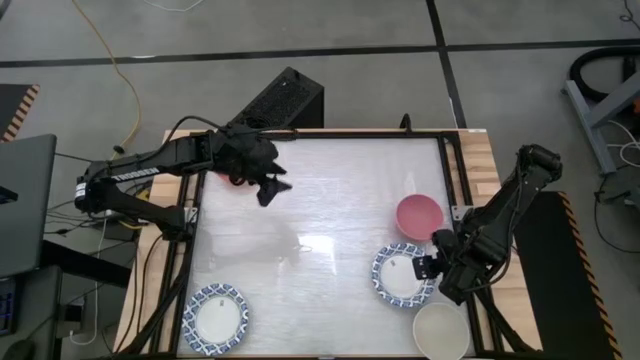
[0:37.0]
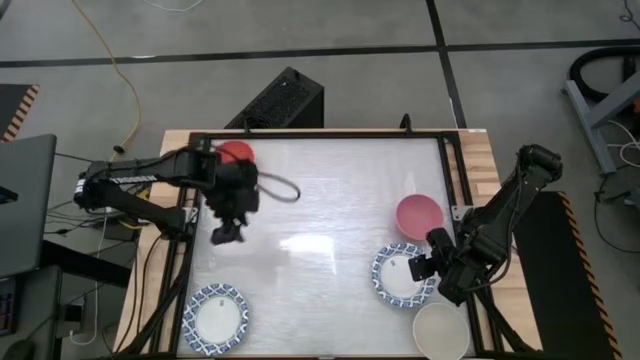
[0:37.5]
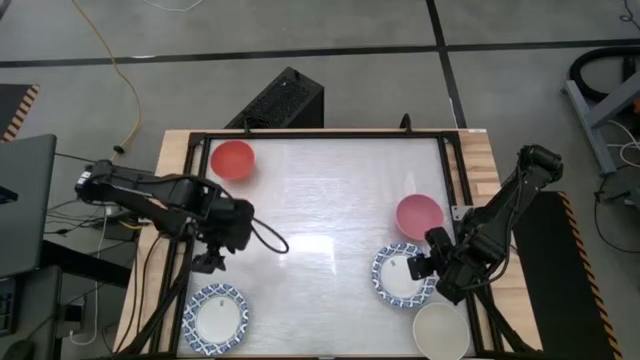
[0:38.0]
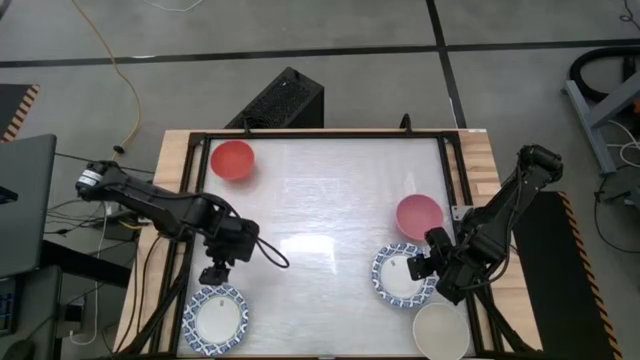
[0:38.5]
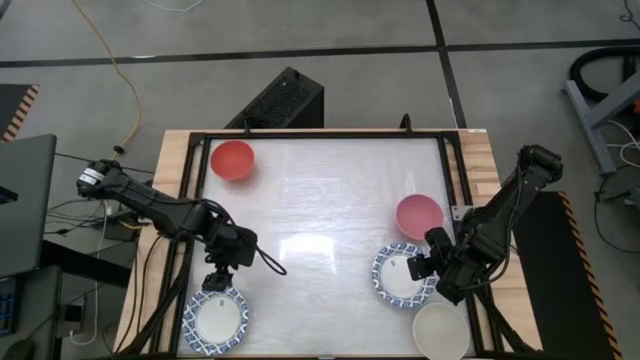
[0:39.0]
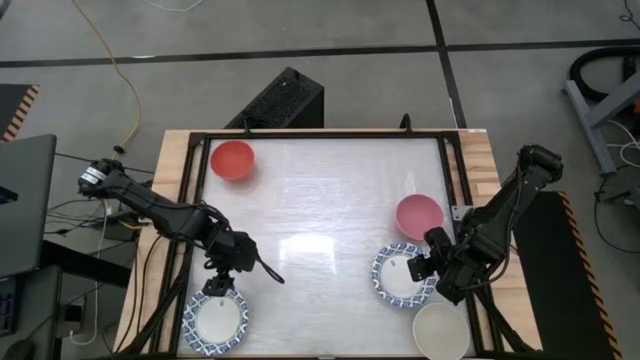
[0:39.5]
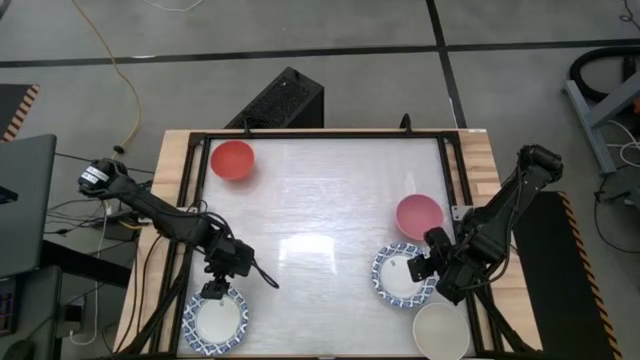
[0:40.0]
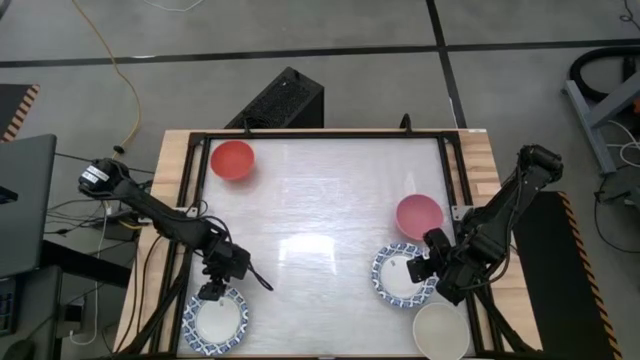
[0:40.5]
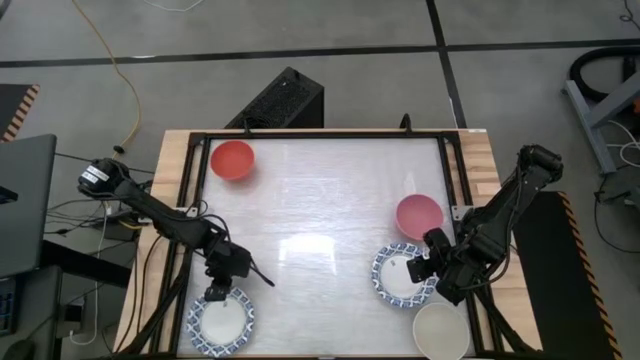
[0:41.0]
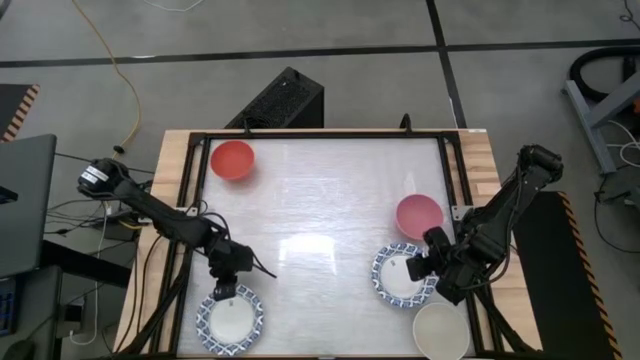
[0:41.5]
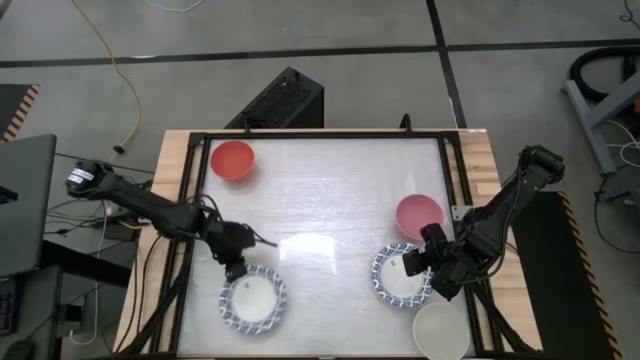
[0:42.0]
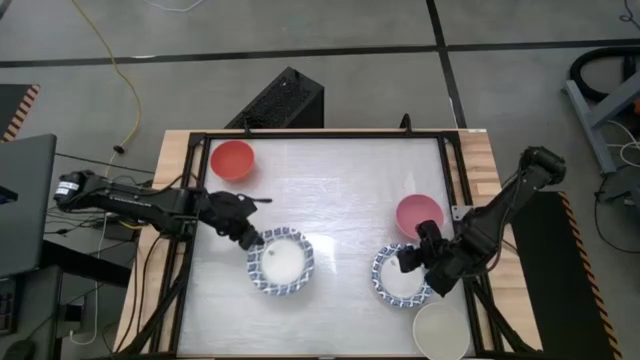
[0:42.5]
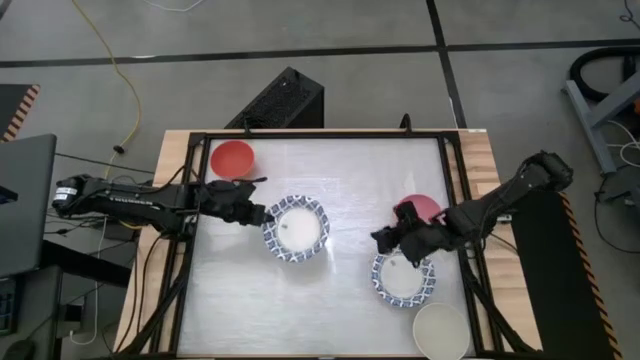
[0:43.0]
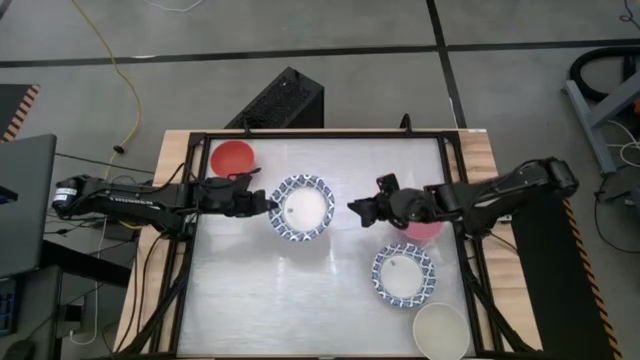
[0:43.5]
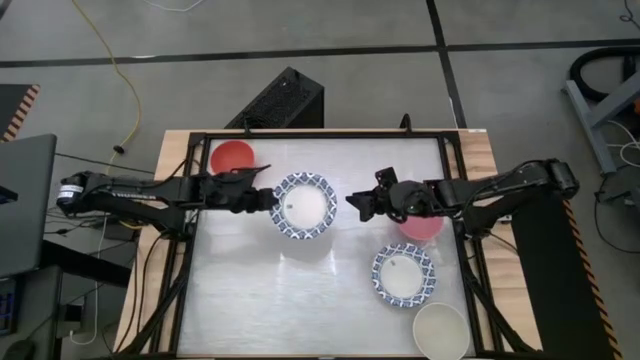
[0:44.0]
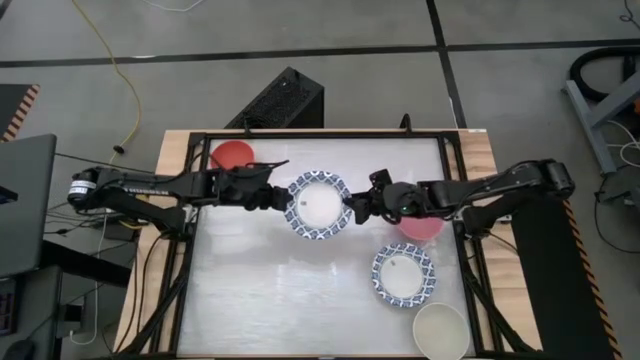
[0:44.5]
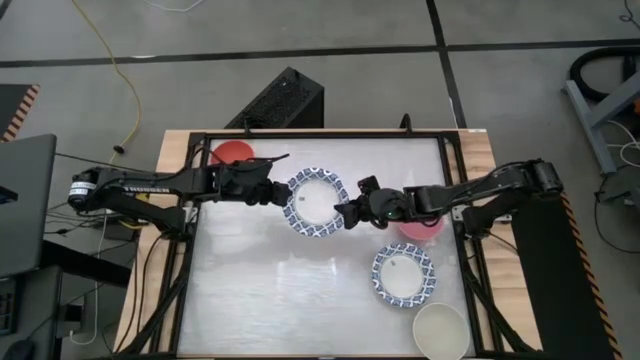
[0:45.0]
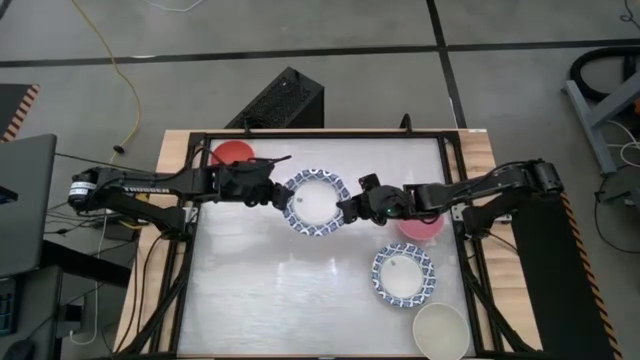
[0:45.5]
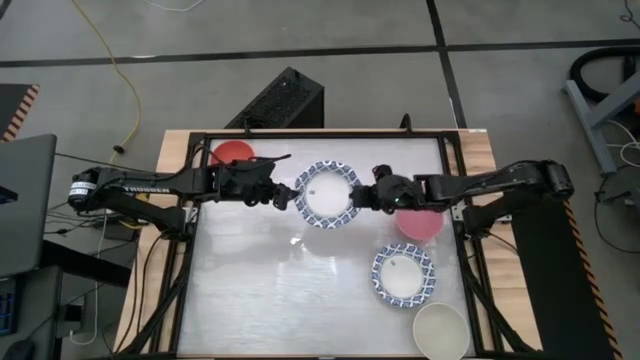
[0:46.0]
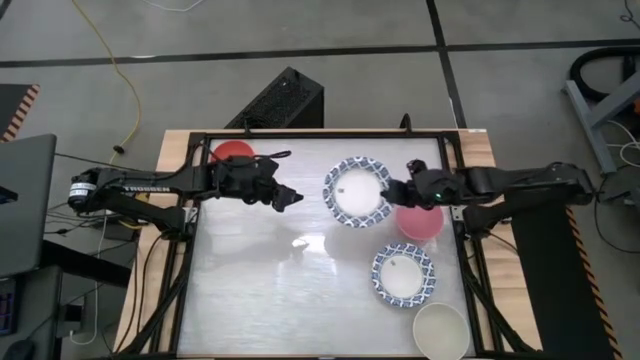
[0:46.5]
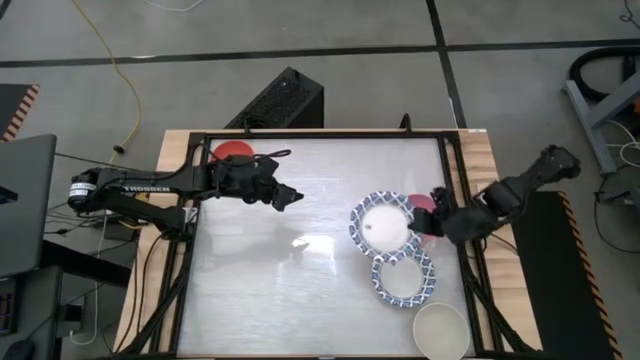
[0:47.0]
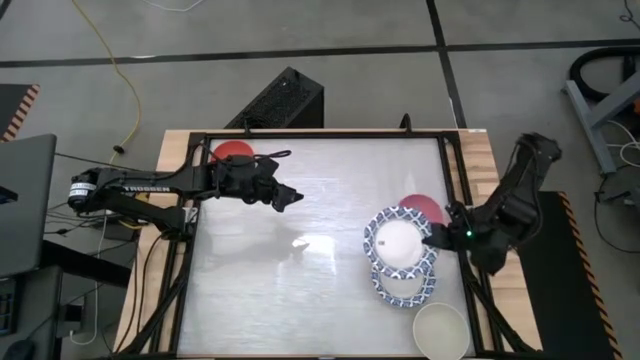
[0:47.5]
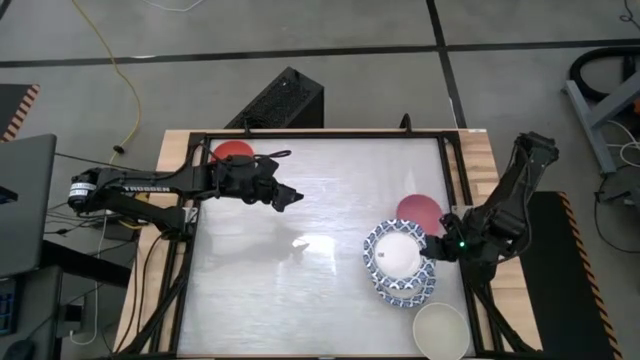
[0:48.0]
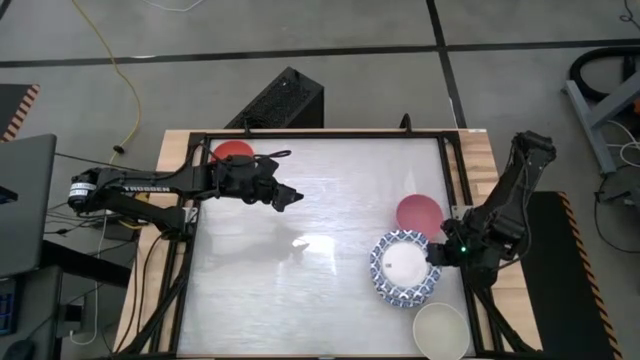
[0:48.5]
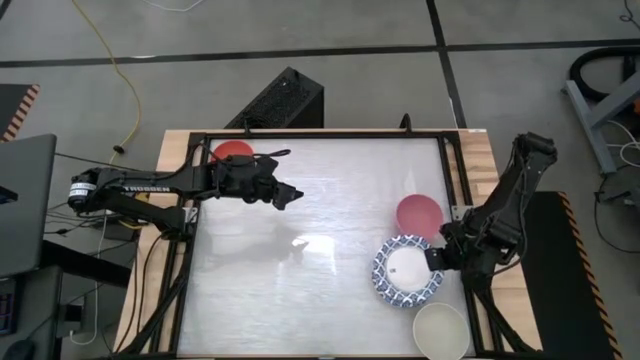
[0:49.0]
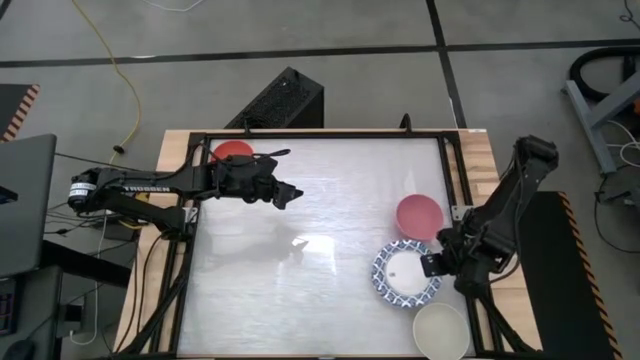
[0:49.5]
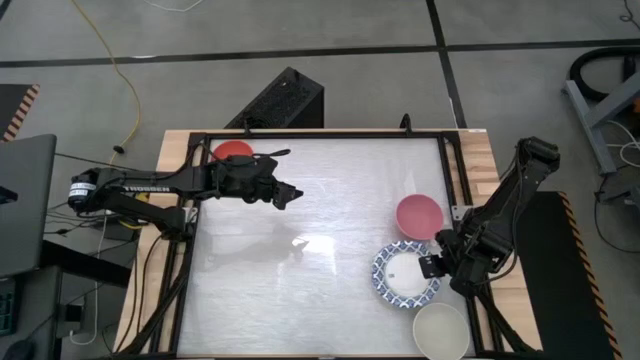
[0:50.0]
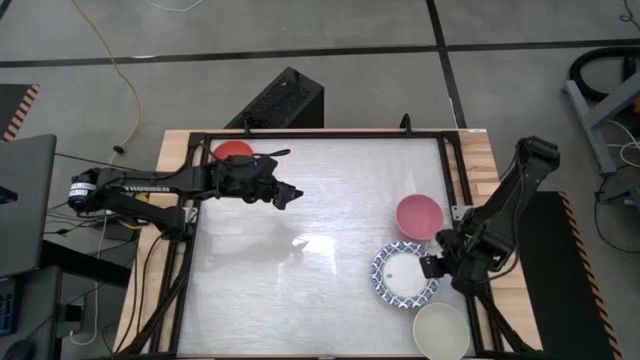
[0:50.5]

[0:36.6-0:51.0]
Task: Nest bowls inside each other by size order
Stack the left blue bowl on top of the right blue bowl

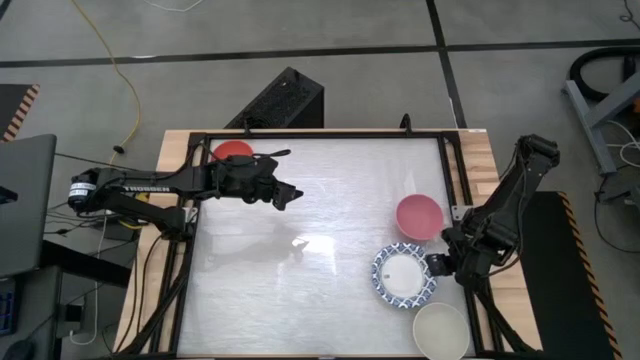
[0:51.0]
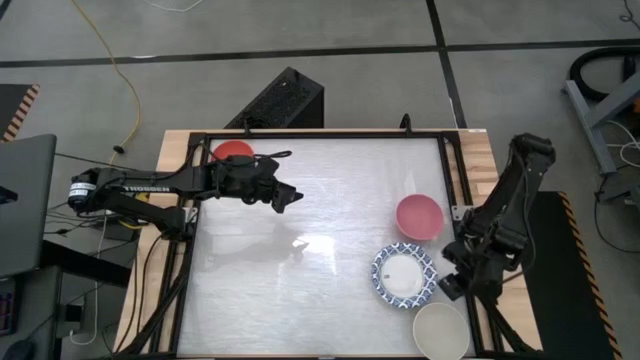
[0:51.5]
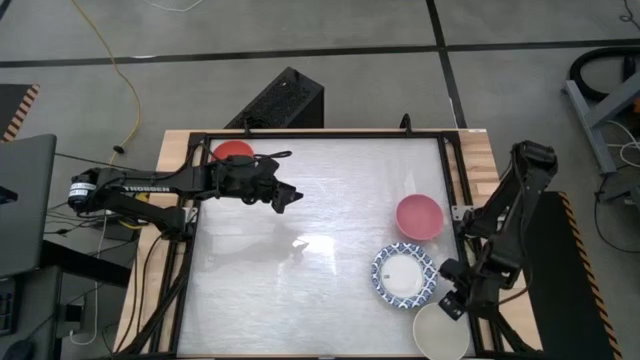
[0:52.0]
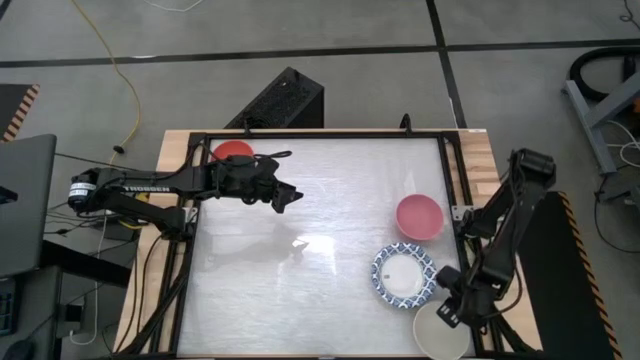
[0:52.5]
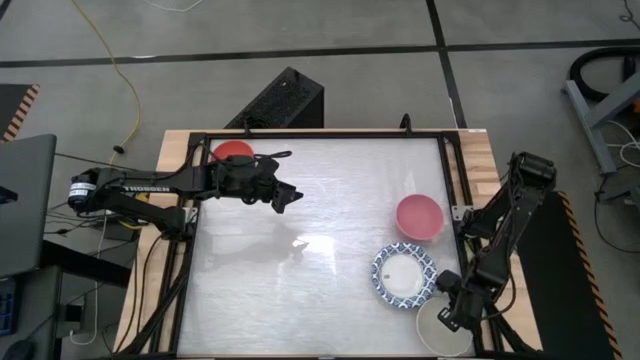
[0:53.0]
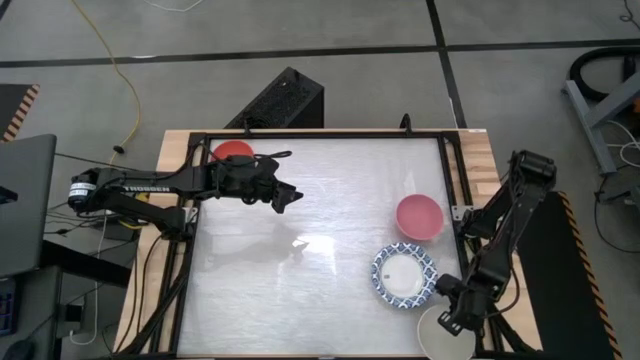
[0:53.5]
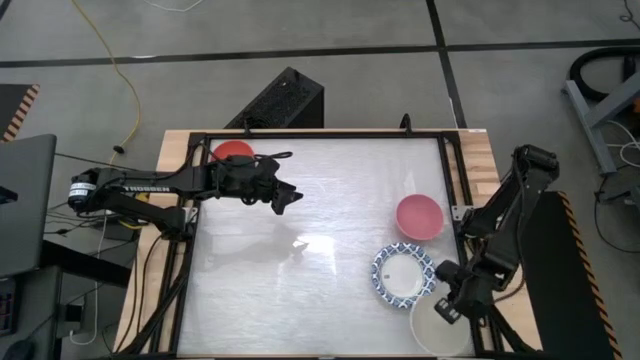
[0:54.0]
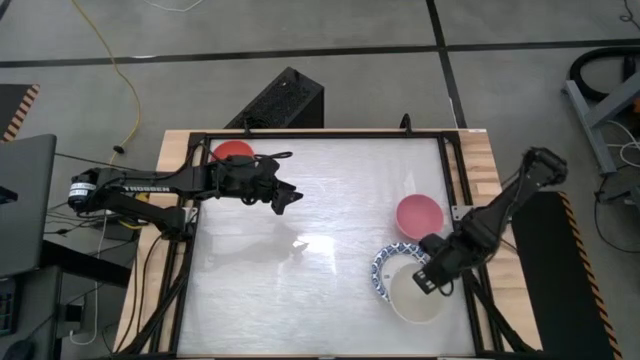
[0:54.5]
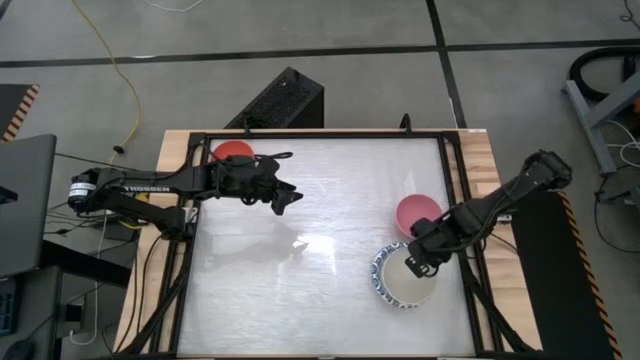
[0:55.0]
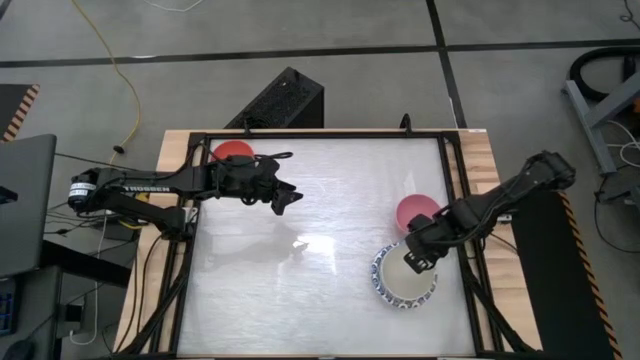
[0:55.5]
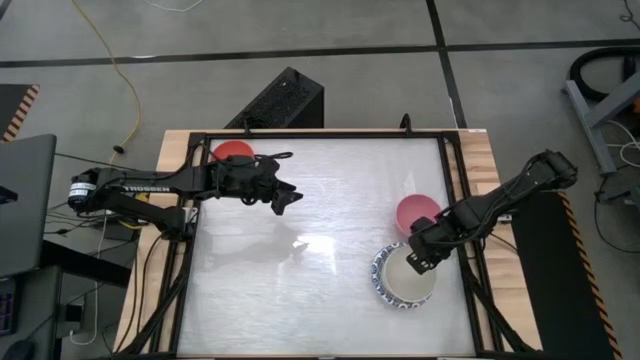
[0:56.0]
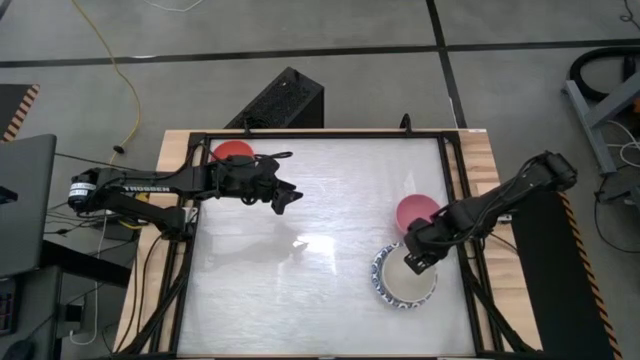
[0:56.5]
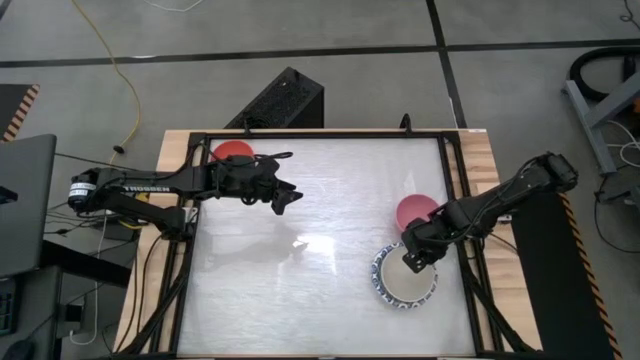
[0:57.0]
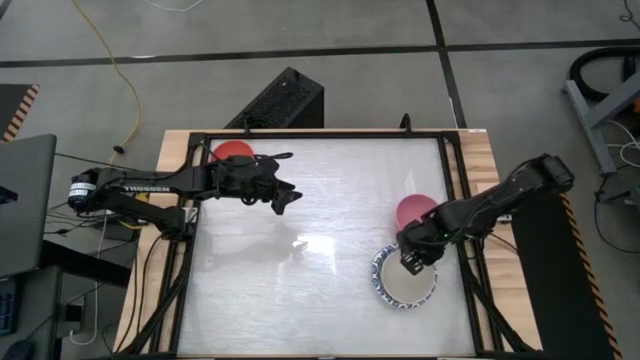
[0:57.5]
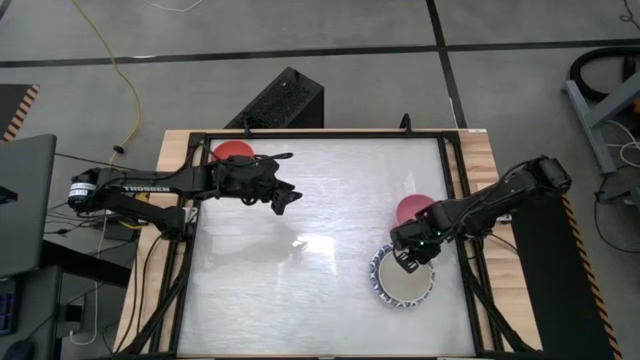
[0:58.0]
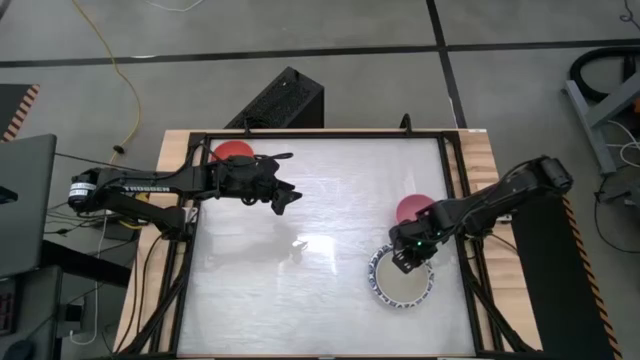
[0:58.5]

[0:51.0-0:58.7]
Stack the white bowl on top of the blue bowl
